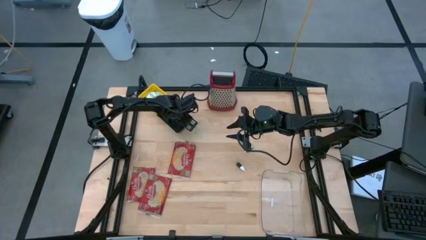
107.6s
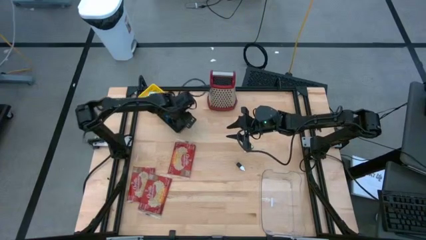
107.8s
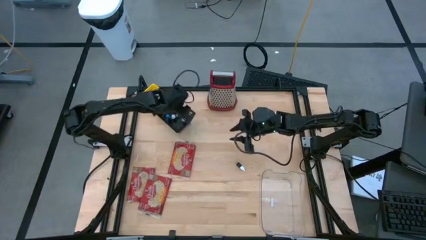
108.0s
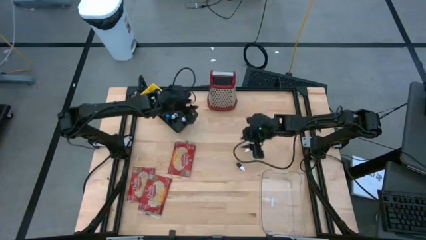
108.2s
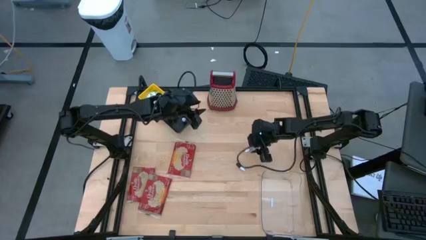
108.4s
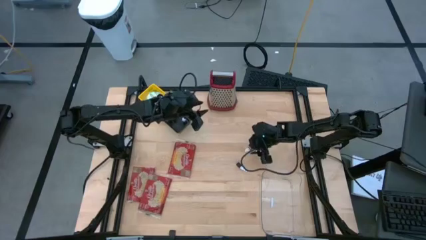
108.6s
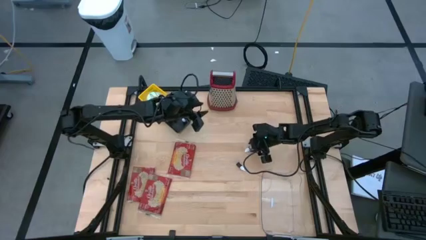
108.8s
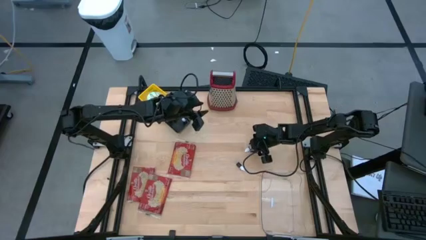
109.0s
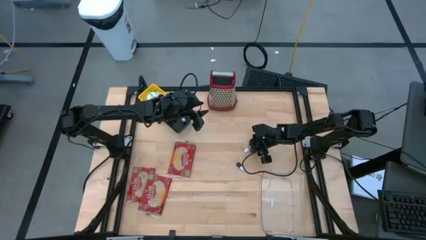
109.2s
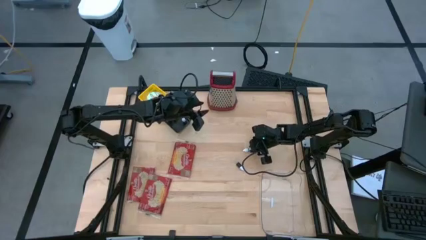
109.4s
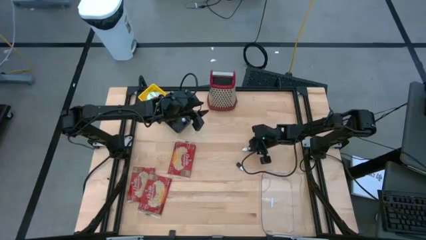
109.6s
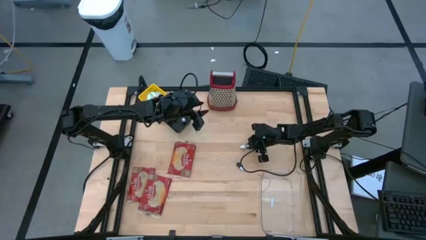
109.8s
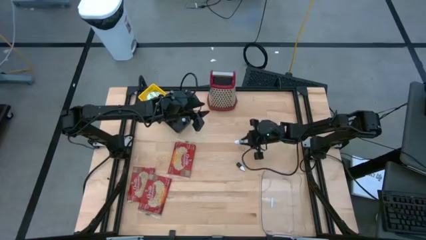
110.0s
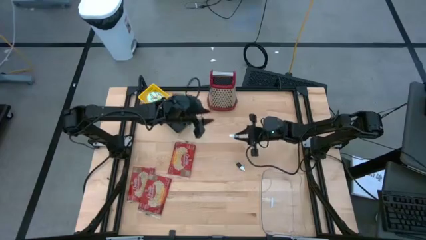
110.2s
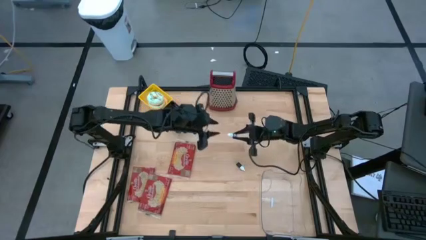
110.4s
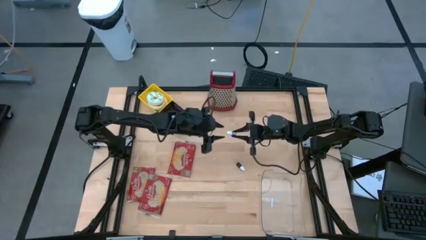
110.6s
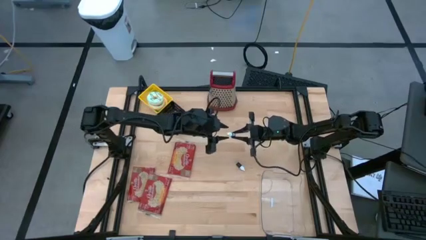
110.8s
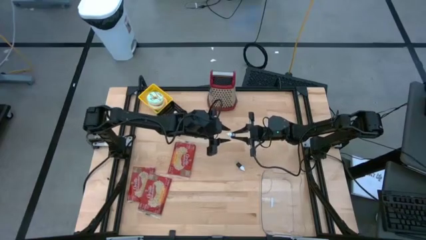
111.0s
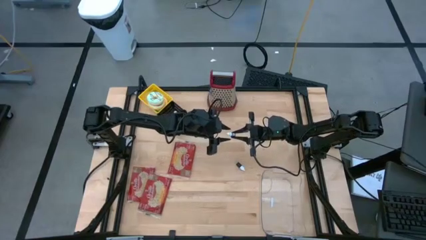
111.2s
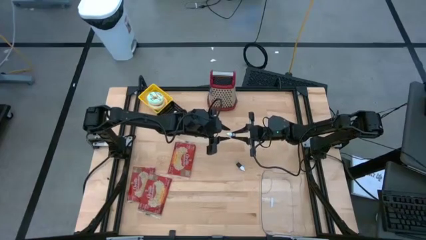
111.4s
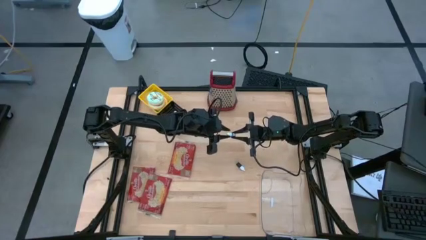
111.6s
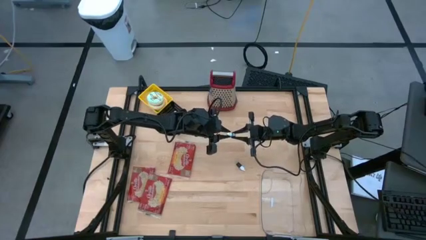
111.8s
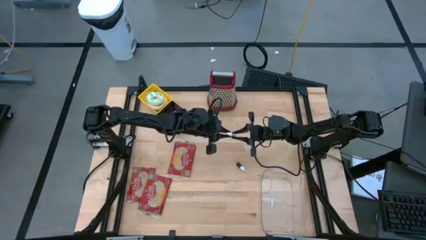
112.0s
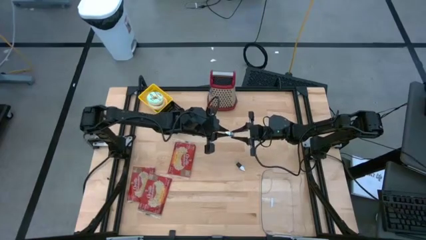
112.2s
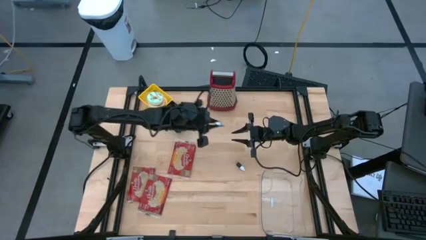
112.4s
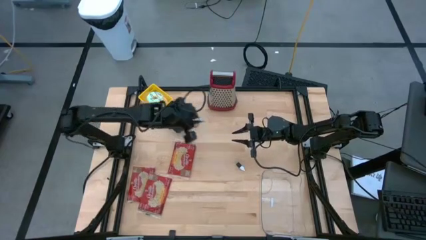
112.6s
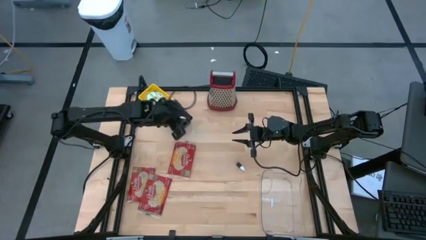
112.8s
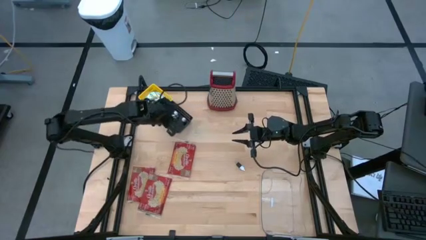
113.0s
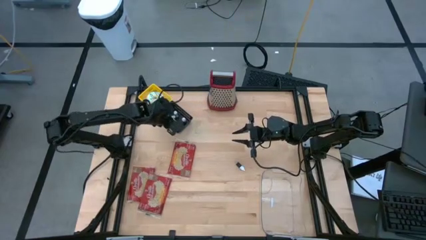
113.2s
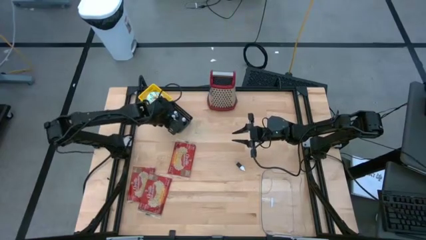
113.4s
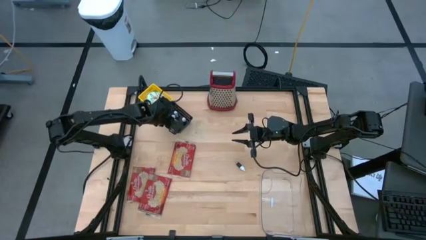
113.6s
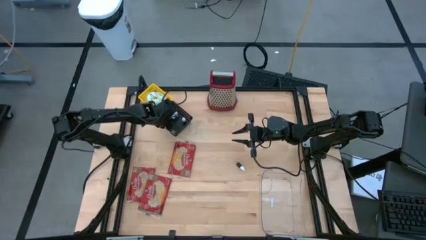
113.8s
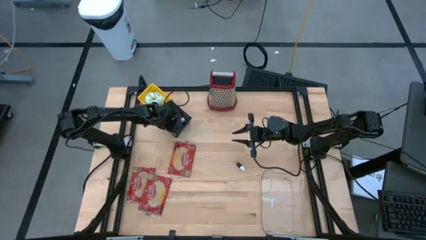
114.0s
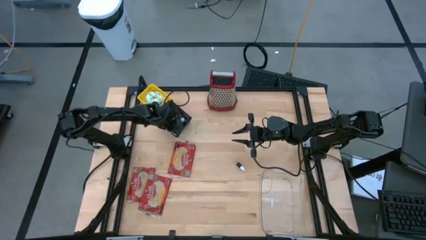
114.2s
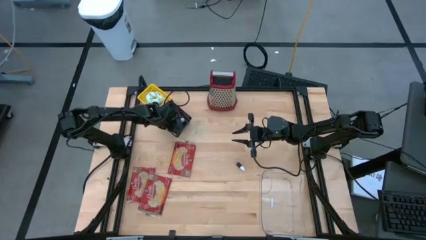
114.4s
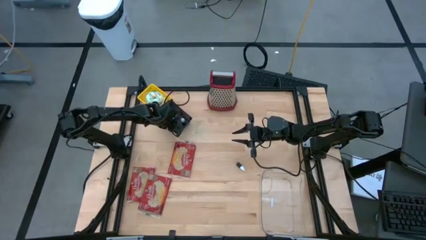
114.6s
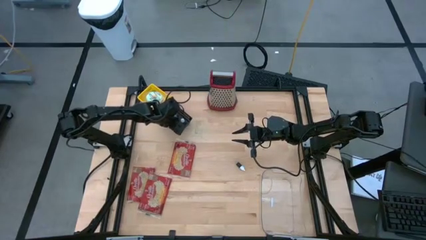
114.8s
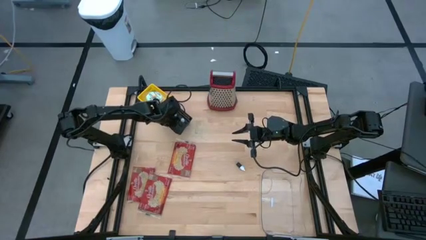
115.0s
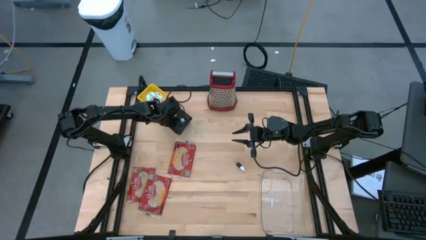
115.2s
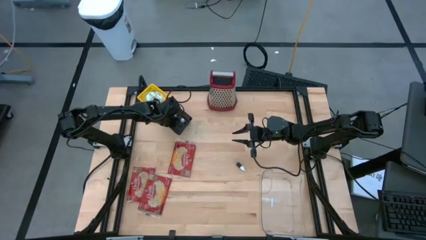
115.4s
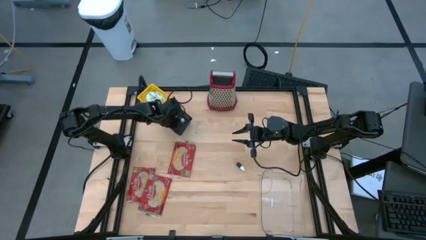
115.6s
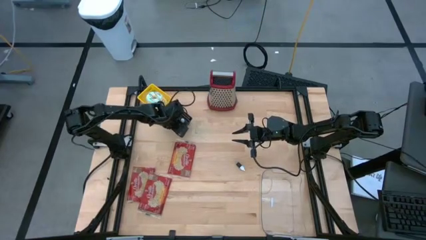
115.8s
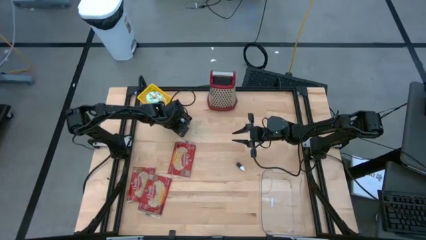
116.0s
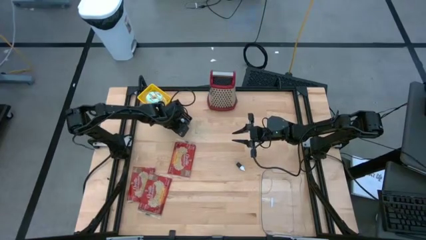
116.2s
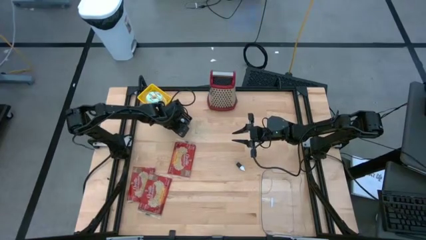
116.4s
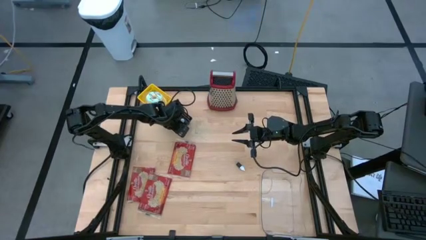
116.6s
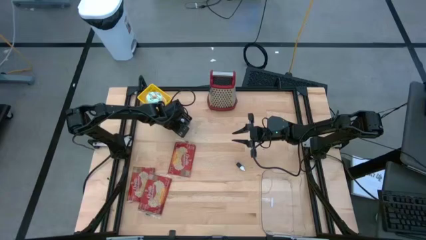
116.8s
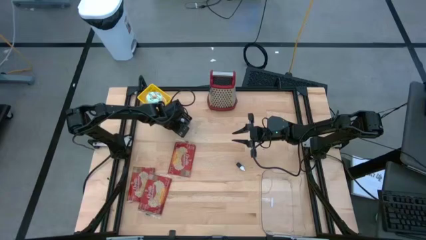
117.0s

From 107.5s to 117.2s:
Put the brown food coloring bottle into the black bin

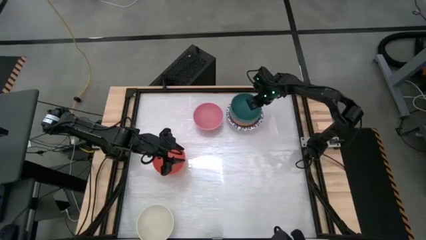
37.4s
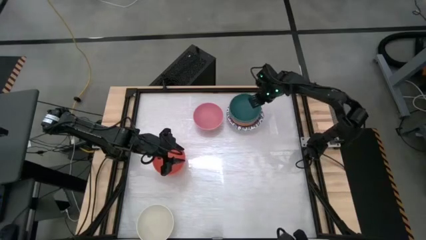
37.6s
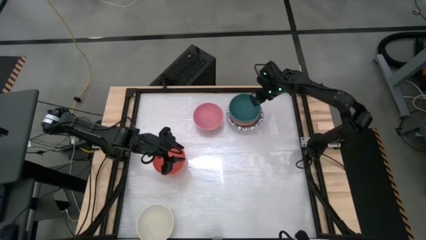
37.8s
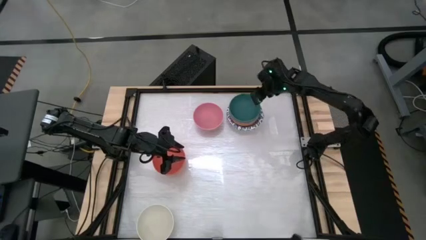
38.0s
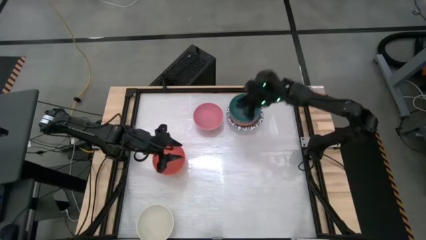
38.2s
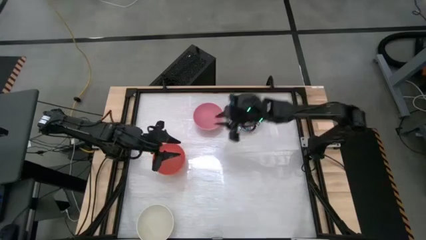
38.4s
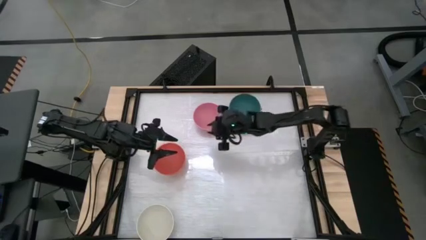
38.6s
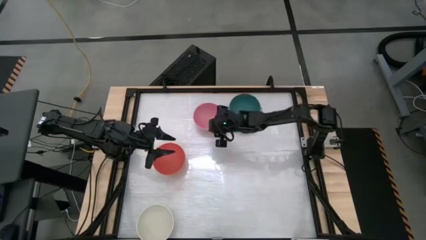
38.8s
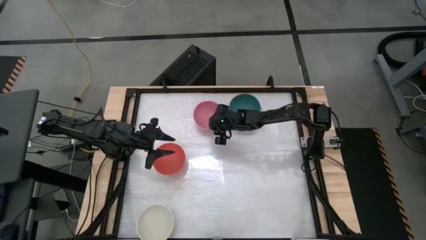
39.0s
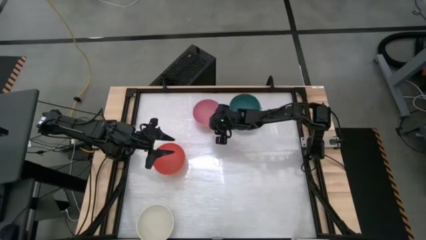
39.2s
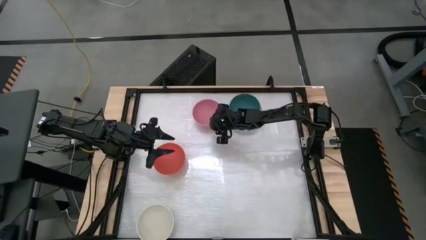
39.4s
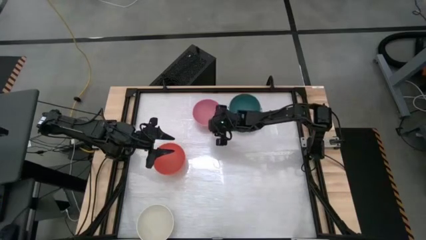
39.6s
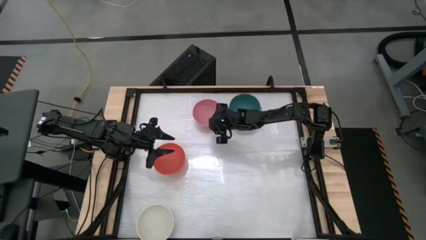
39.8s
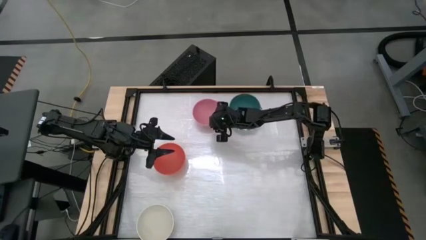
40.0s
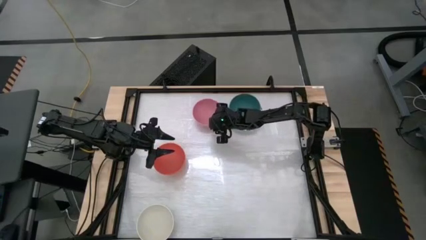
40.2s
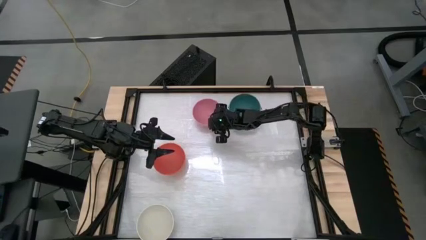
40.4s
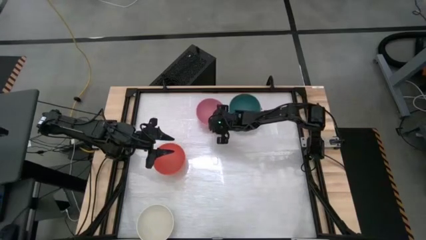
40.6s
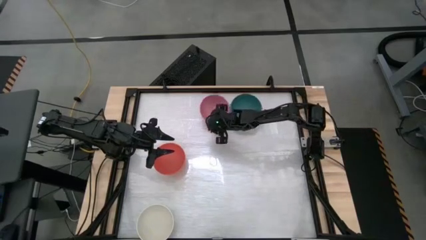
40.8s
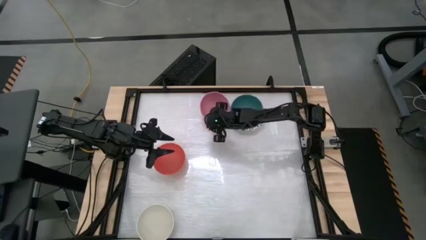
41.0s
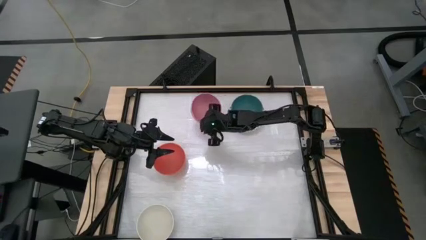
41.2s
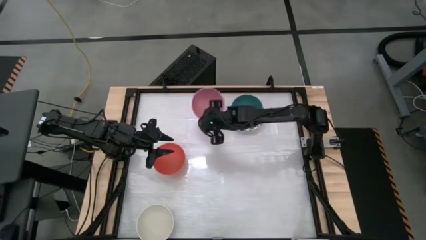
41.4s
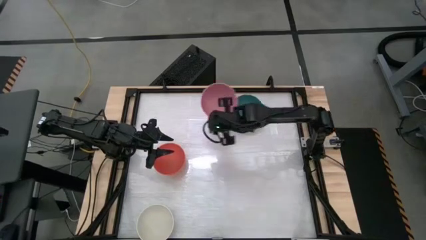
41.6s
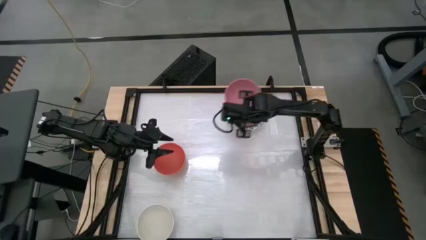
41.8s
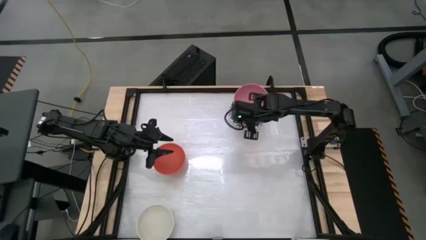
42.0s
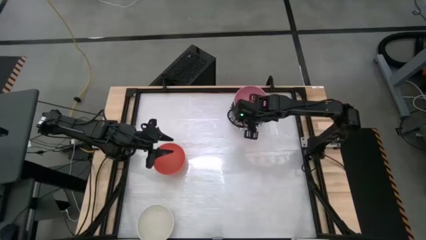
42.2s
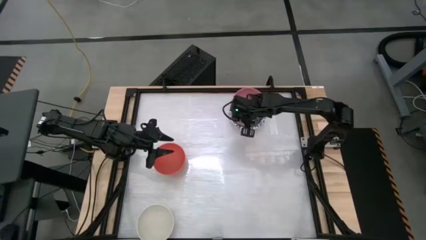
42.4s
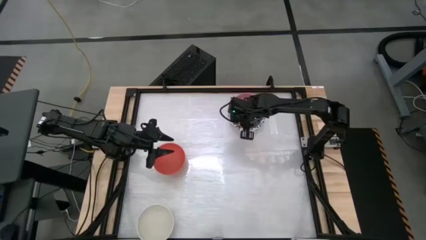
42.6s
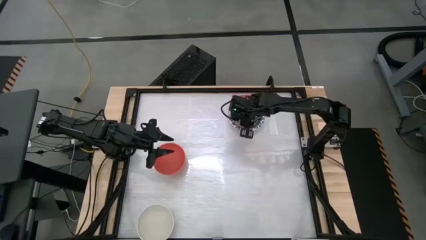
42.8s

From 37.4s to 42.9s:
Stack the pink bowl into the green bowl
